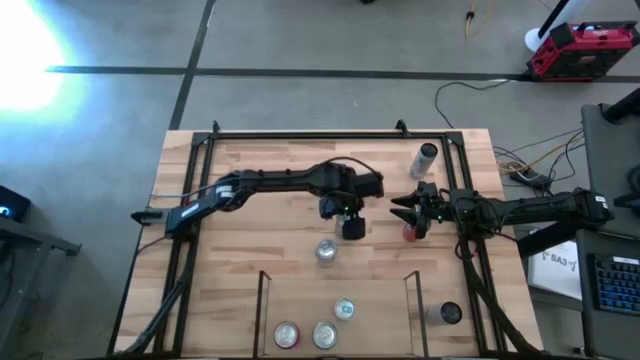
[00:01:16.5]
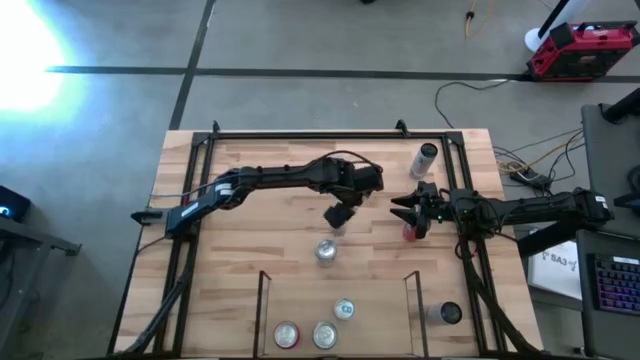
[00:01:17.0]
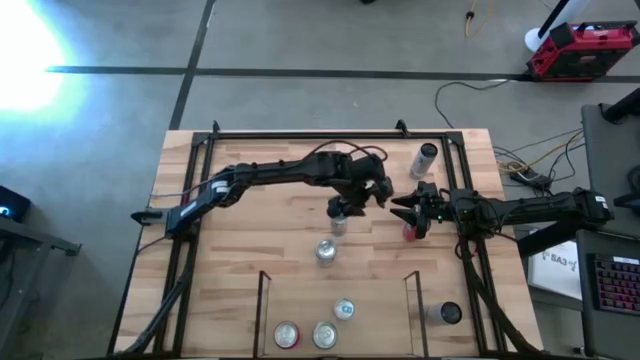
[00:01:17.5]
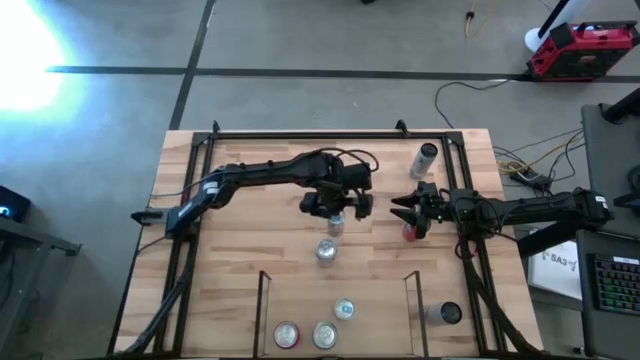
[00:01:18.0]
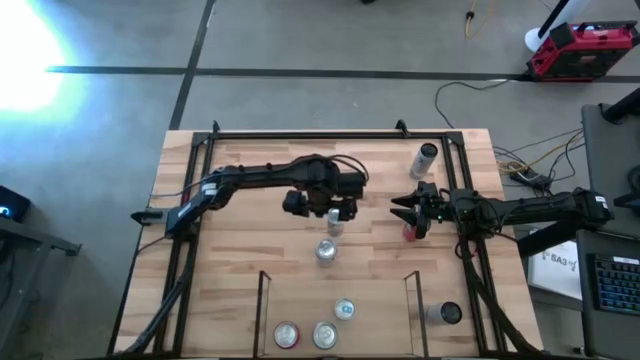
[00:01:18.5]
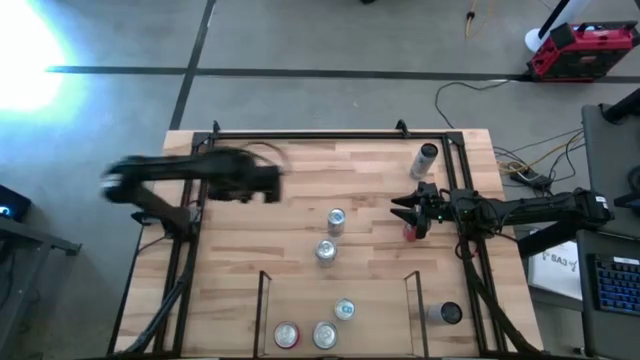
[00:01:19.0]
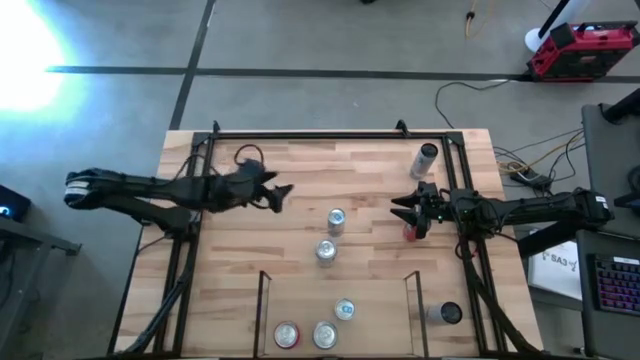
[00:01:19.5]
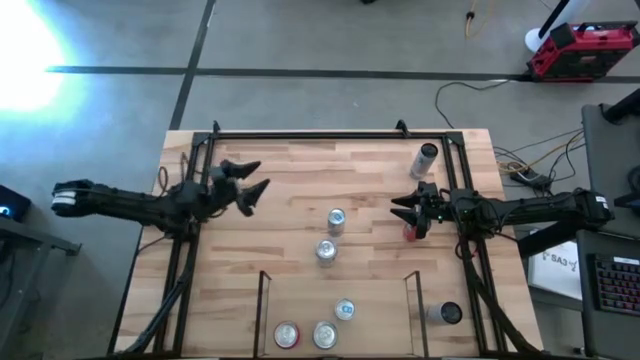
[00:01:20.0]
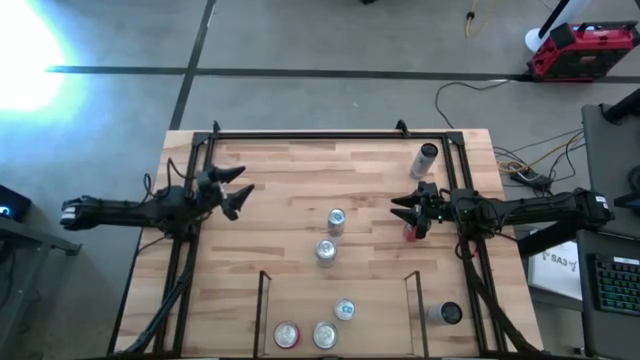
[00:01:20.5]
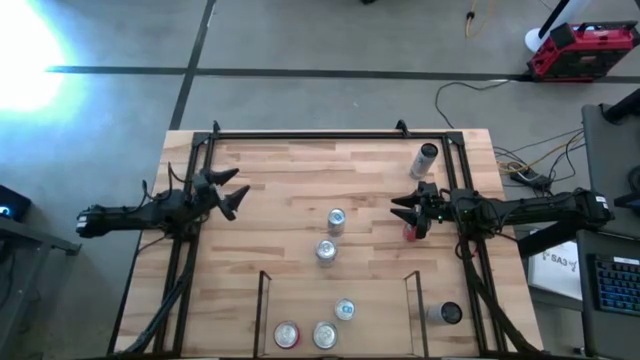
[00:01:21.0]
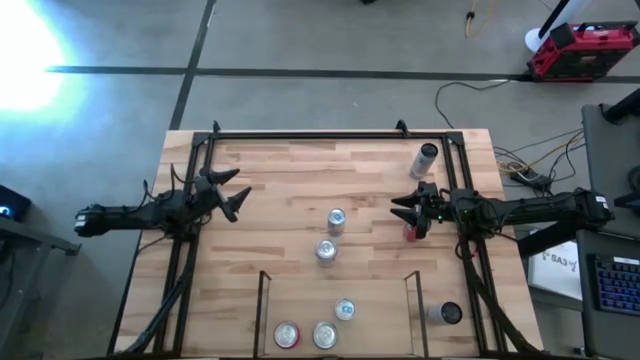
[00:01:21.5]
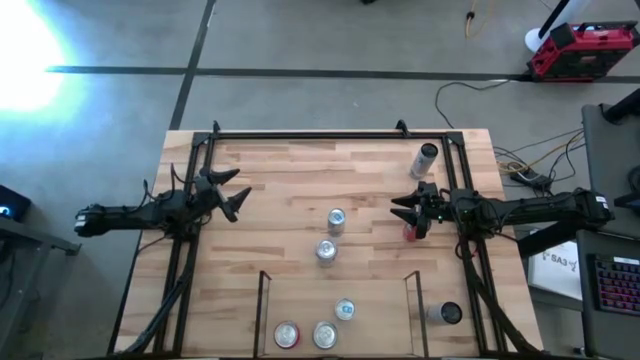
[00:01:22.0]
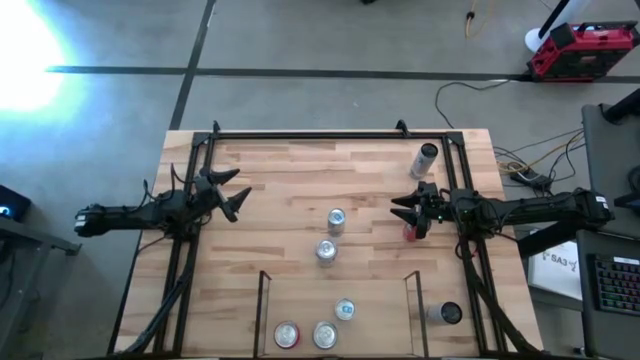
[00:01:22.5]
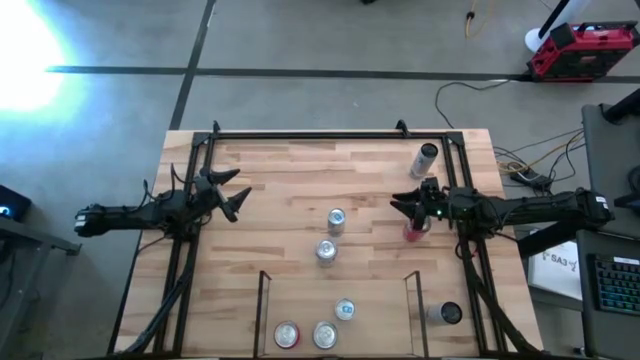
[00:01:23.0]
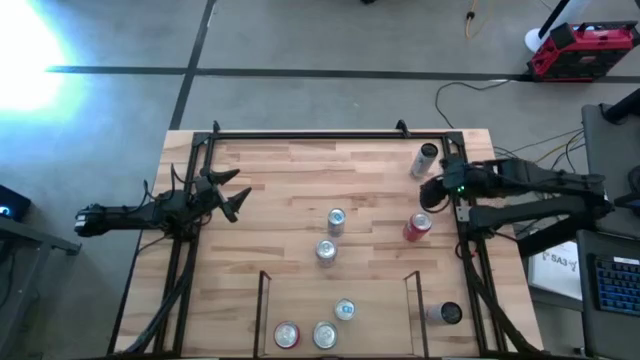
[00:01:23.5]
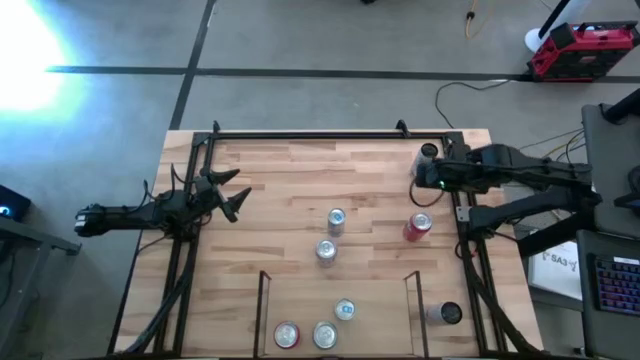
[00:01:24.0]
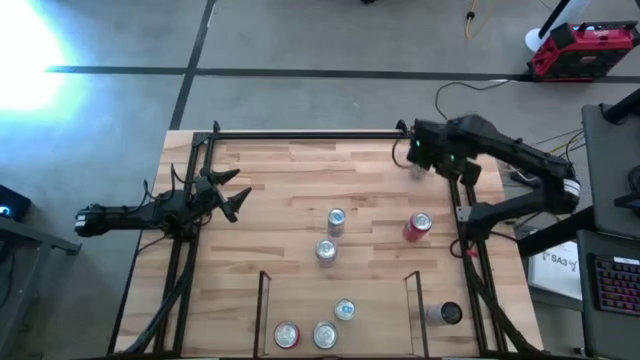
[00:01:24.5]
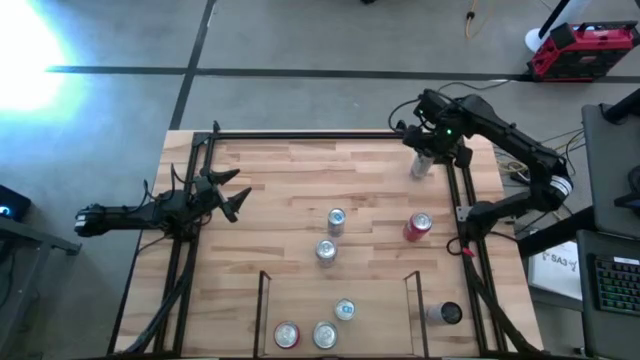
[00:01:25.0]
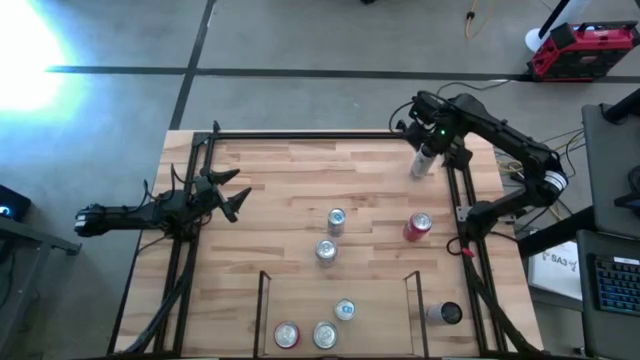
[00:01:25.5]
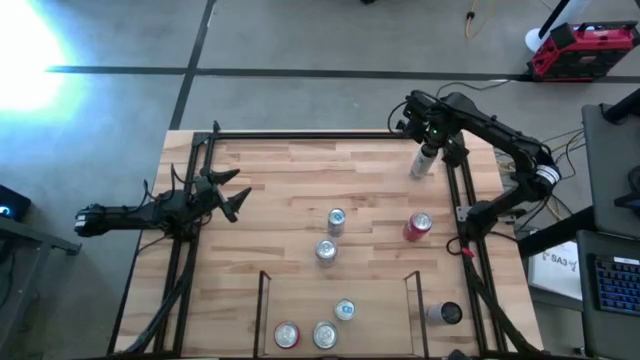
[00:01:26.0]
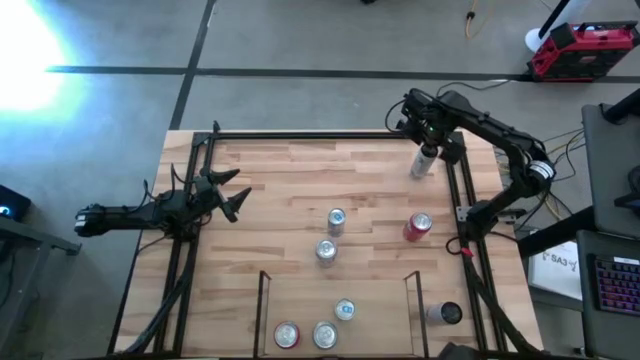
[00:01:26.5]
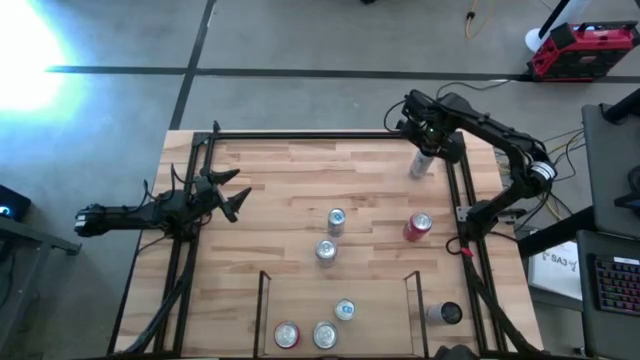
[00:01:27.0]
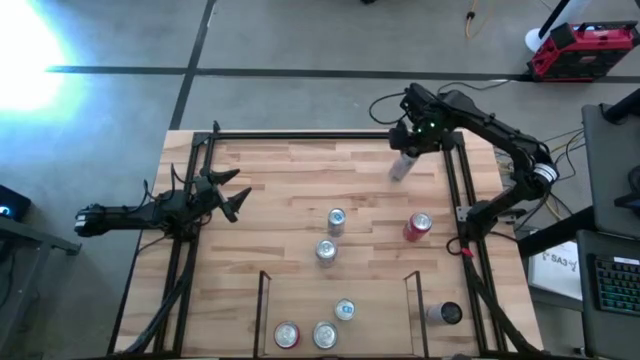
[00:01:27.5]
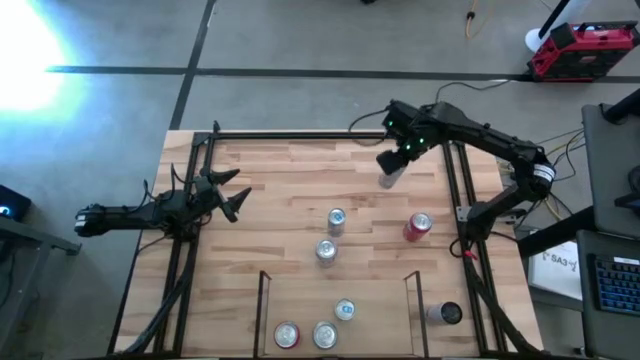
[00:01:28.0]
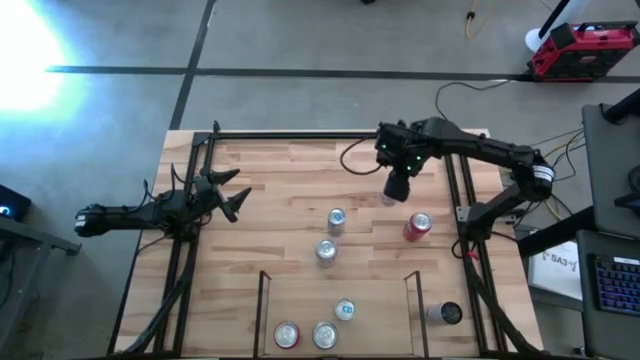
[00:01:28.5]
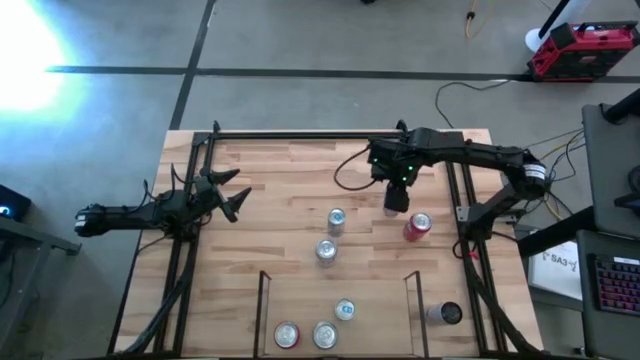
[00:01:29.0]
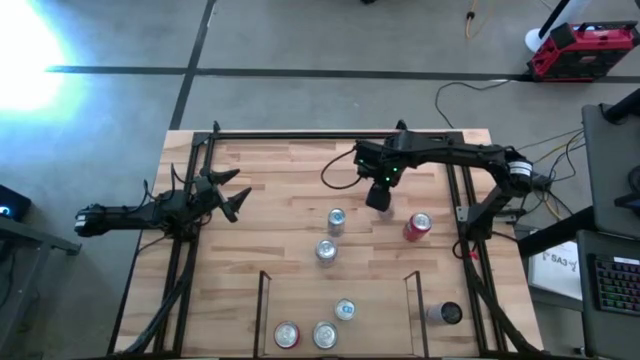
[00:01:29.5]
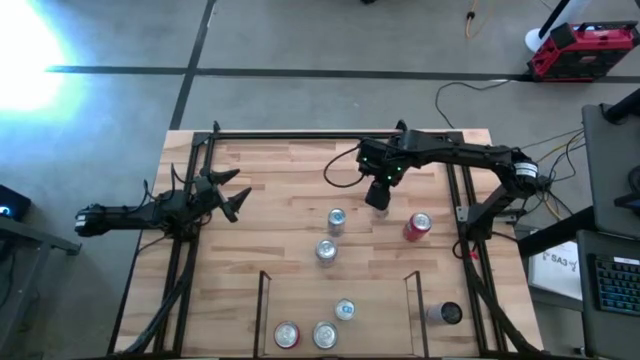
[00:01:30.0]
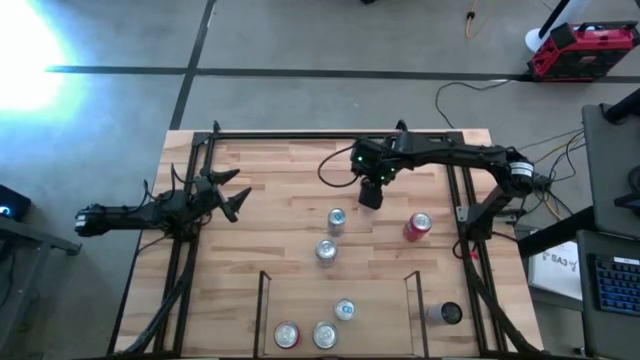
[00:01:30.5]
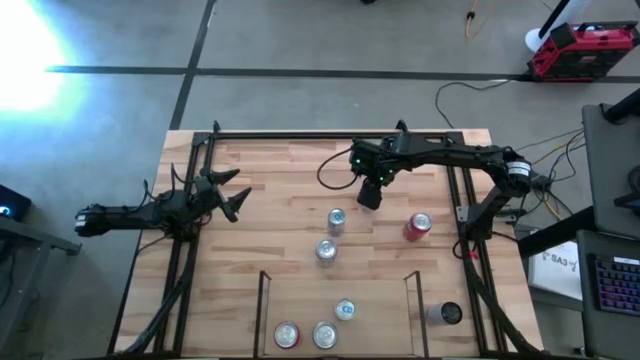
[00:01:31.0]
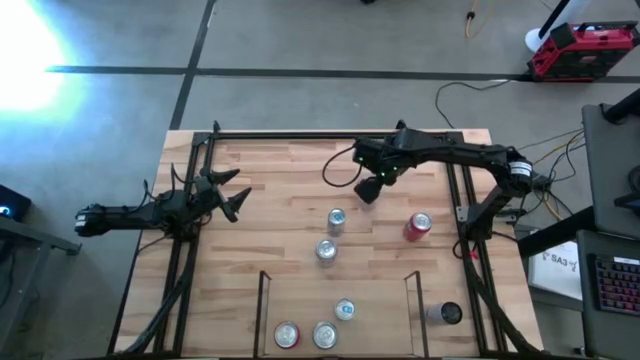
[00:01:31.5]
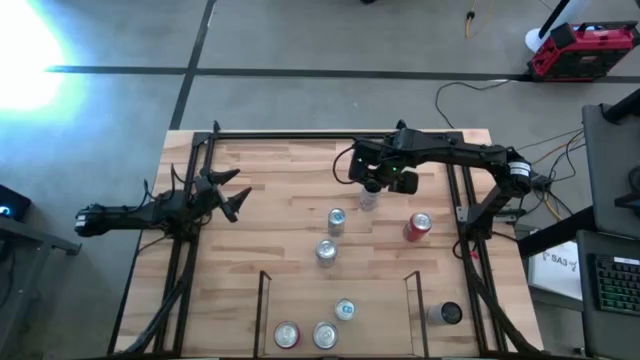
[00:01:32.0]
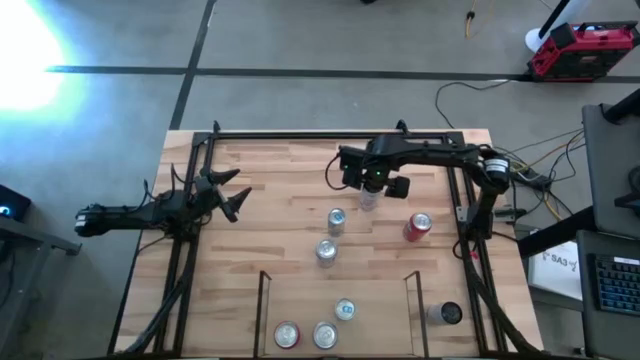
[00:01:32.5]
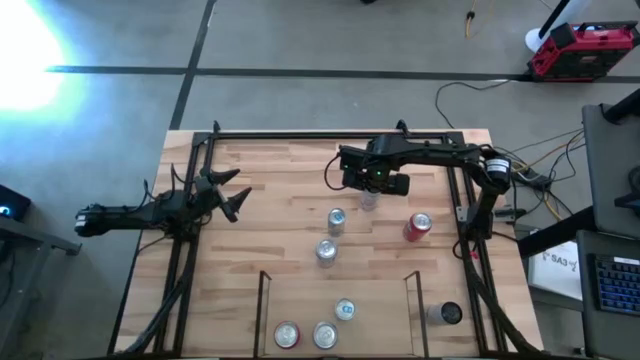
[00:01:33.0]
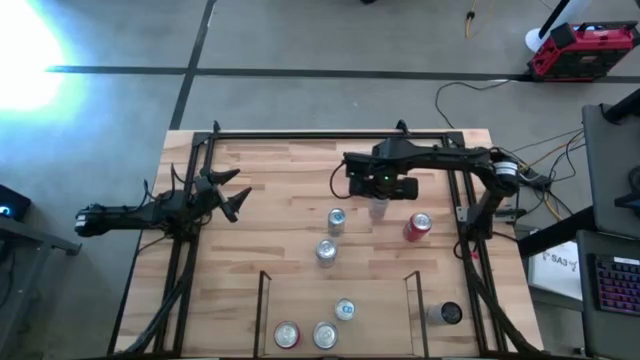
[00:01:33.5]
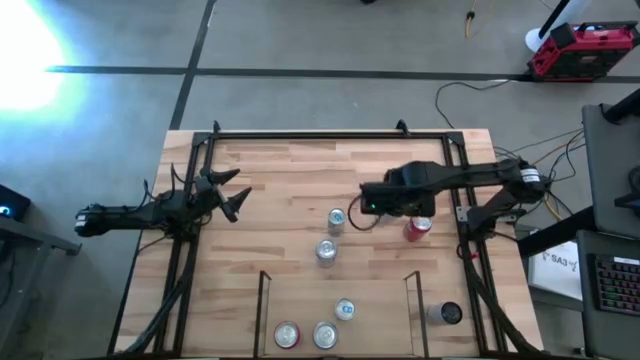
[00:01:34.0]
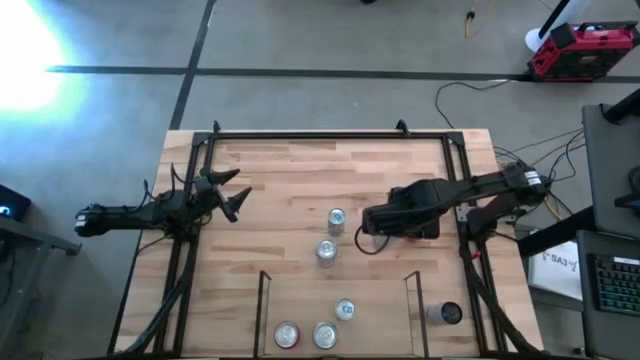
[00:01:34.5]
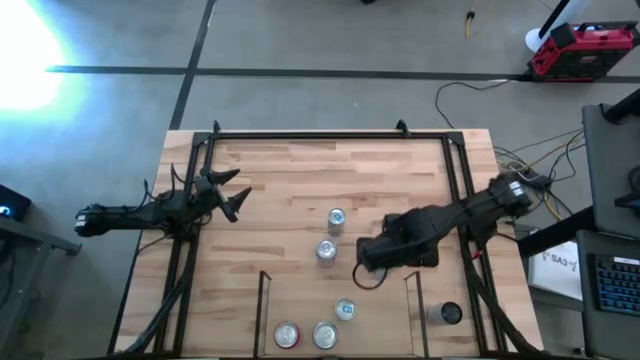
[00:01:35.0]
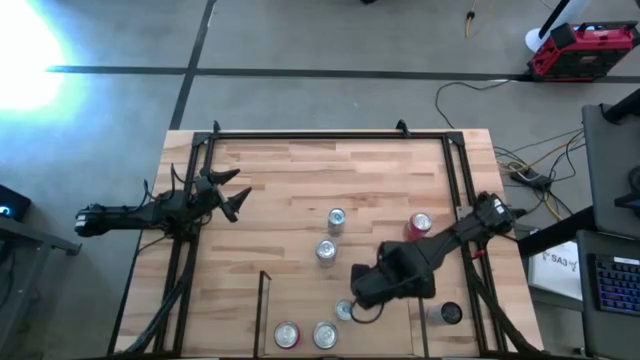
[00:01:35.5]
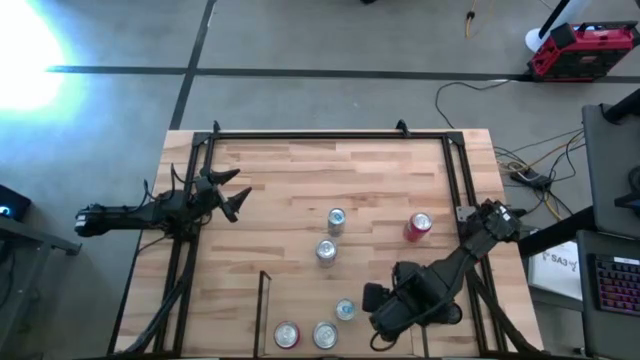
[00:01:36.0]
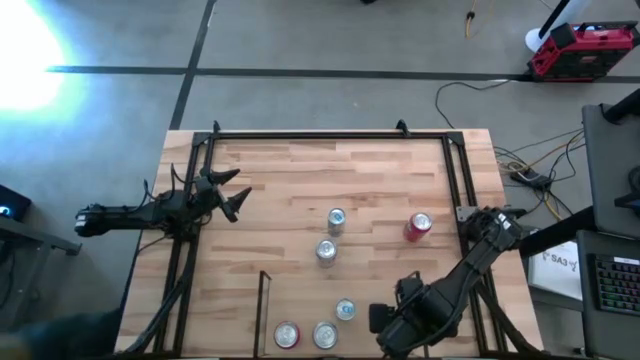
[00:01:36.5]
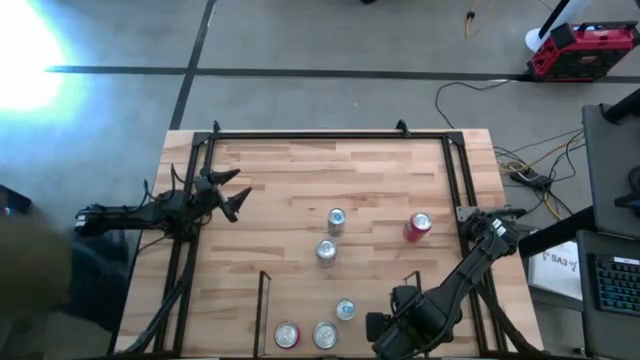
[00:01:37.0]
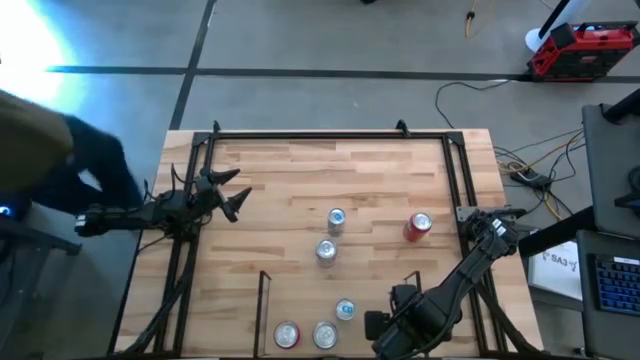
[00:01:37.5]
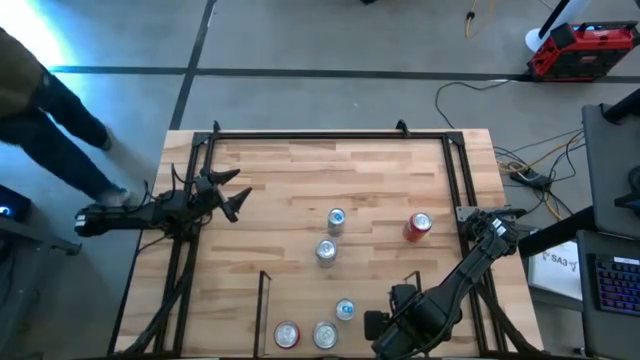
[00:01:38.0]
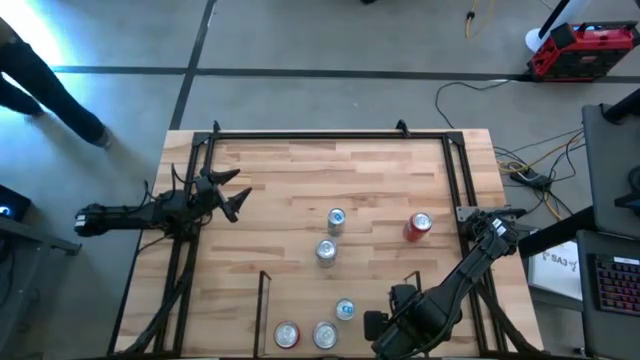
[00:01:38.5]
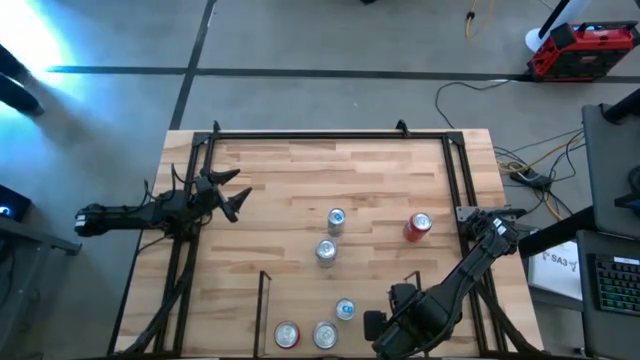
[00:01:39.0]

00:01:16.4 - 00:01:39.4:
Task: Place canned beverage on shelf
Put the top white pink soda can on the shelf
